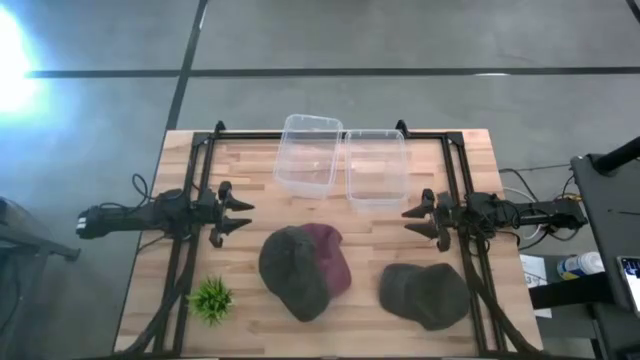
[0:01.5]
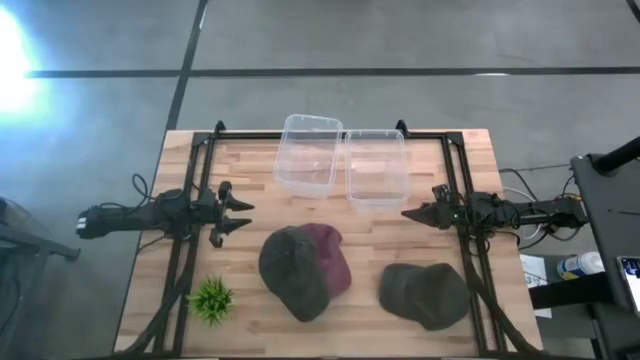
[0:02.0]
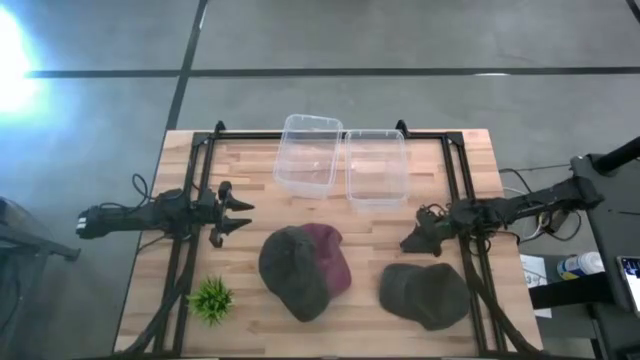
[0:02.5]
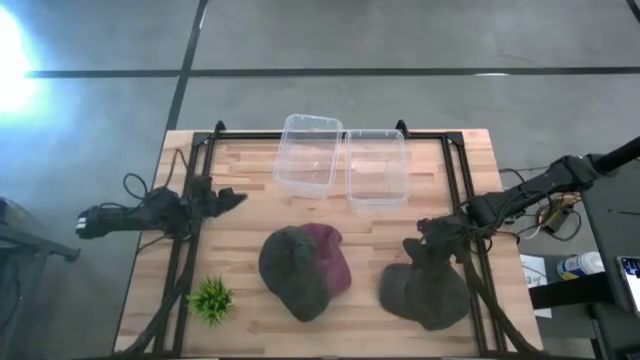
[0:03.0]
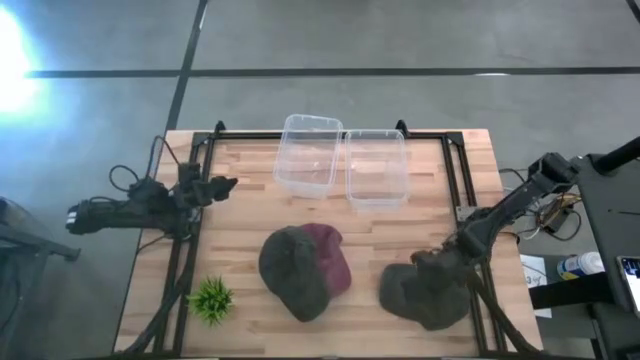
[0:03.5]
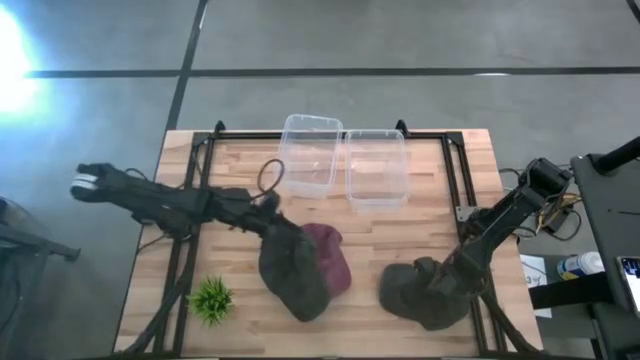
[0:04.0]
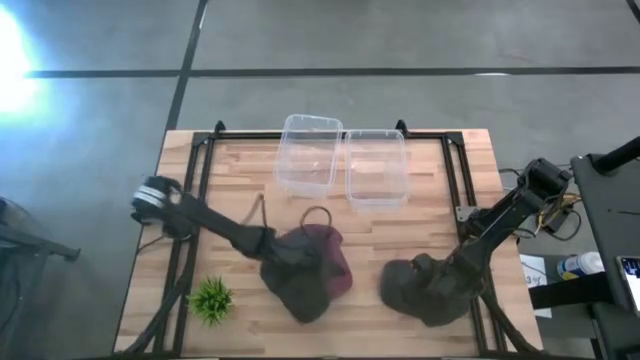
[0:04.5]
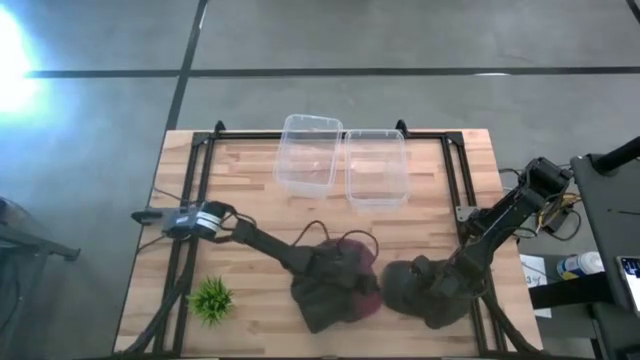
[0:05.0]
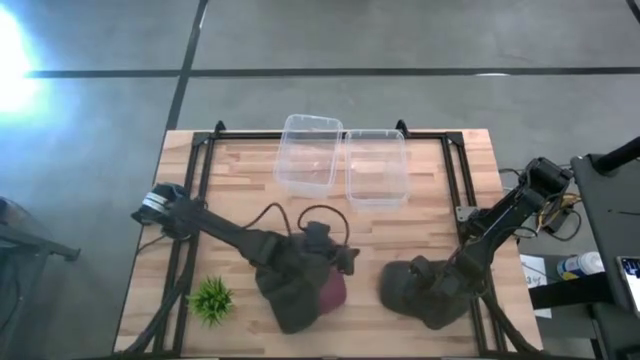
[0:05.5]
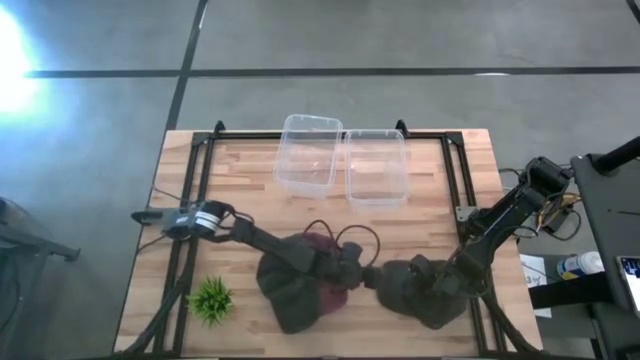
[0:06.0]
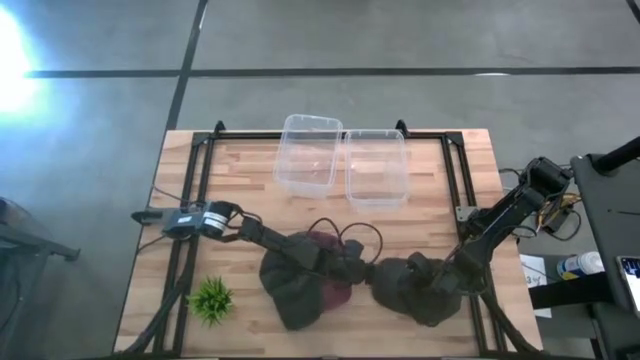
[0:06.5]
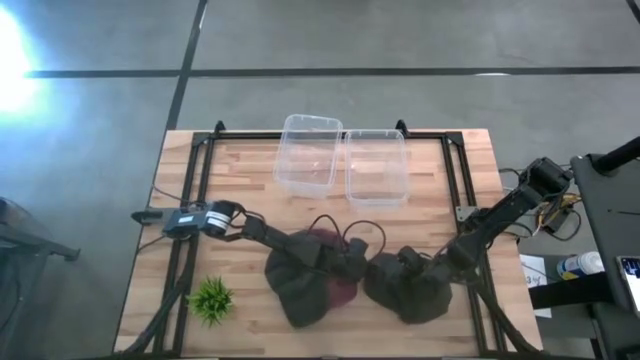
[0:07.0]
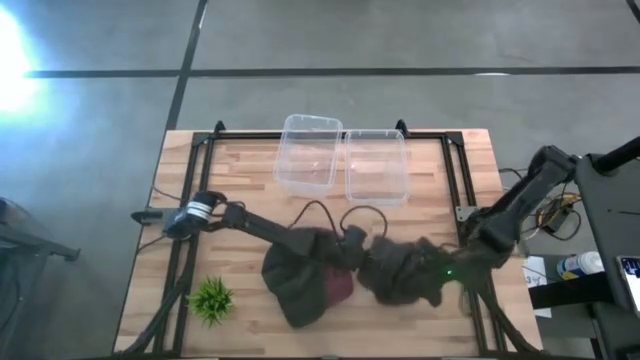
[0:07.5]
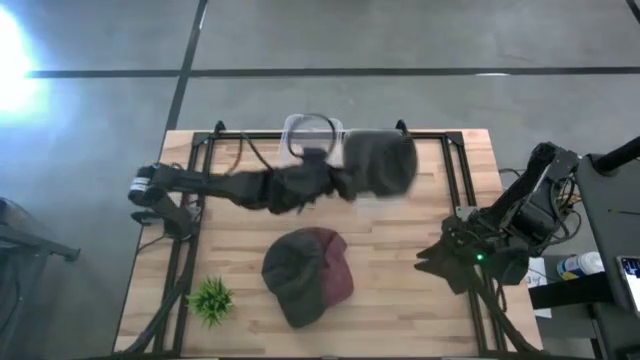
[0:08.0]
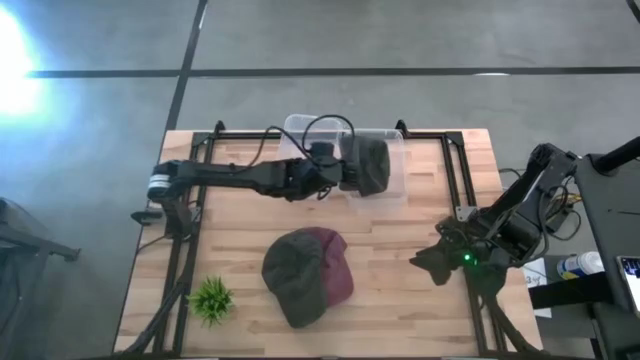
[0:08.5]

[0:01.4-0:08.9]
Task: Pick & Place hat
Put the right black cap into the right transparent bin

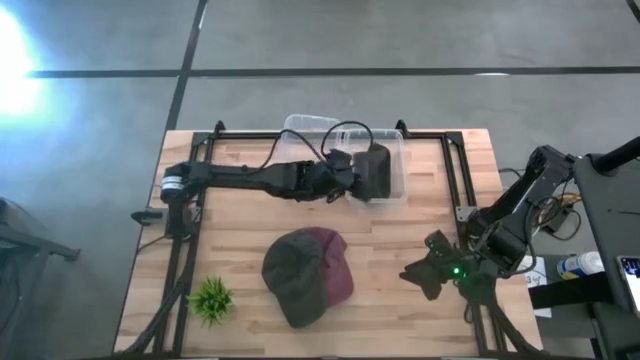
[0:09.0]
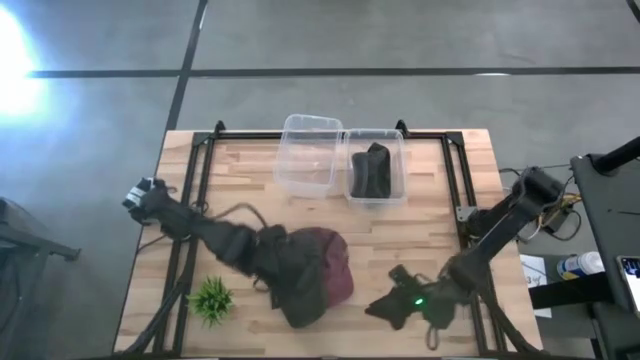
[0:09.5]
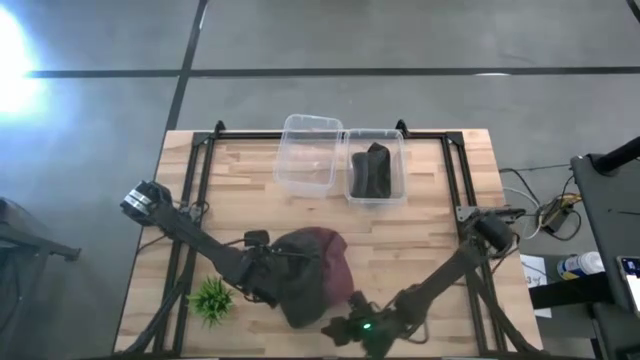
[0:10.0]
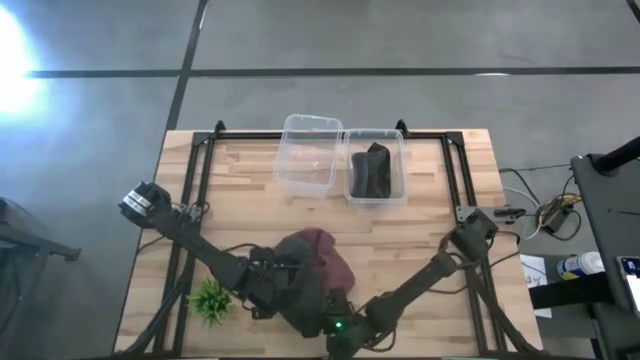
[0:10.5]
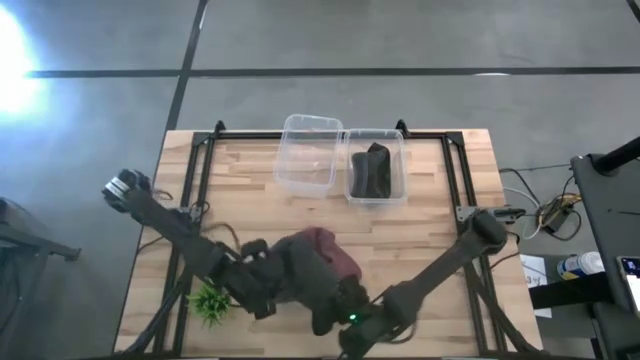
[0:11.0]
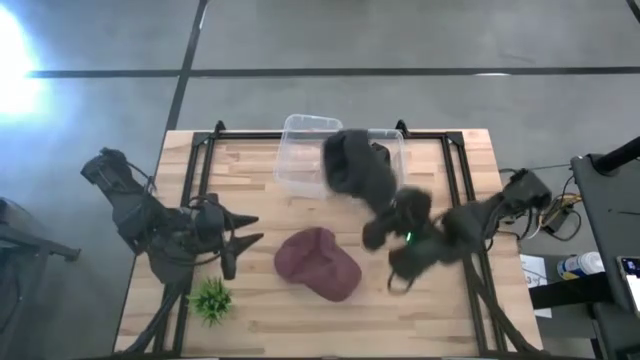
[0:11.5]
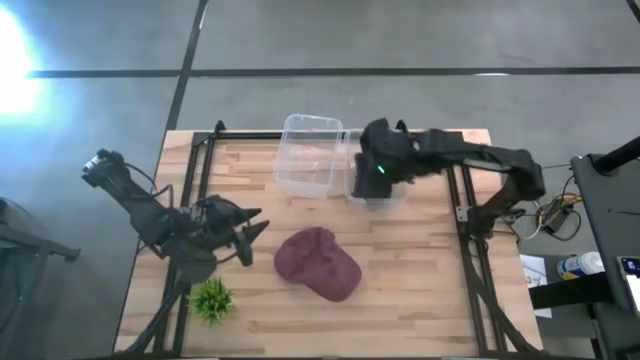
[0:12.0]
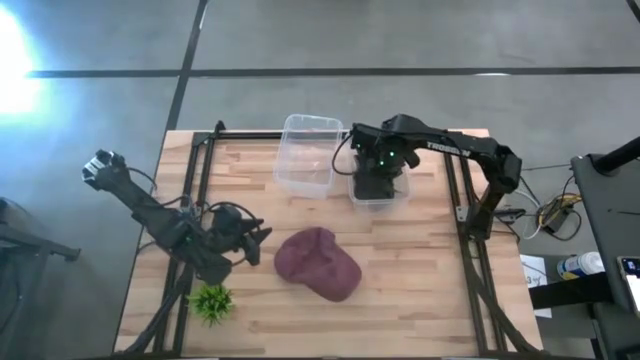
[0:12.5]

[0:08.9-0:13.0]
Put the black cap into the right transparent bin

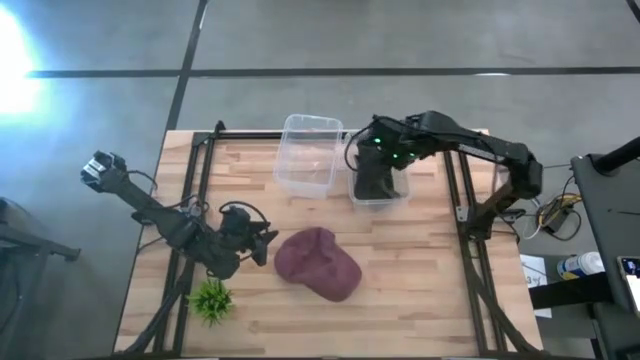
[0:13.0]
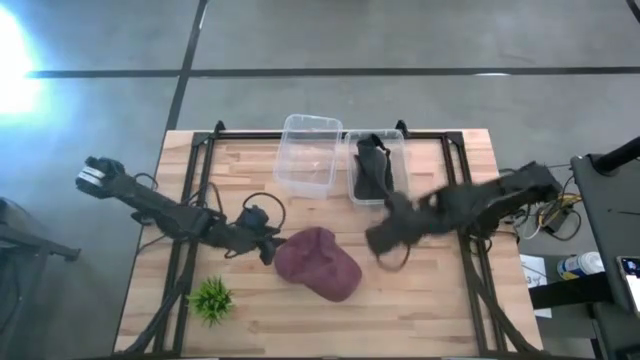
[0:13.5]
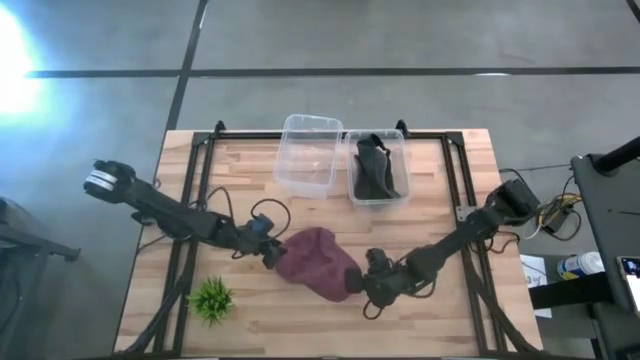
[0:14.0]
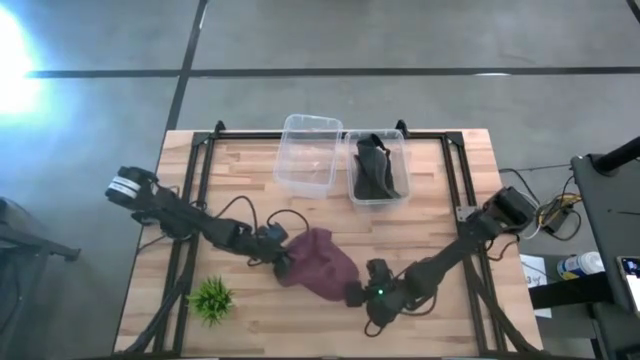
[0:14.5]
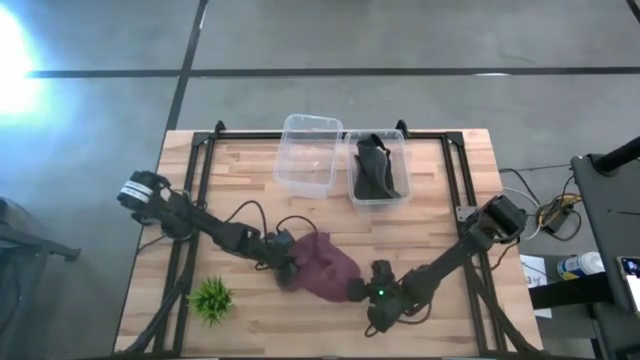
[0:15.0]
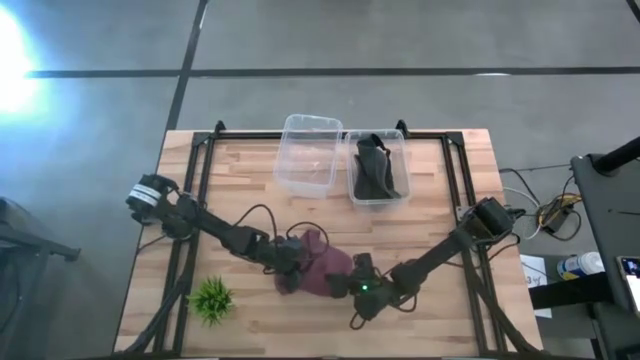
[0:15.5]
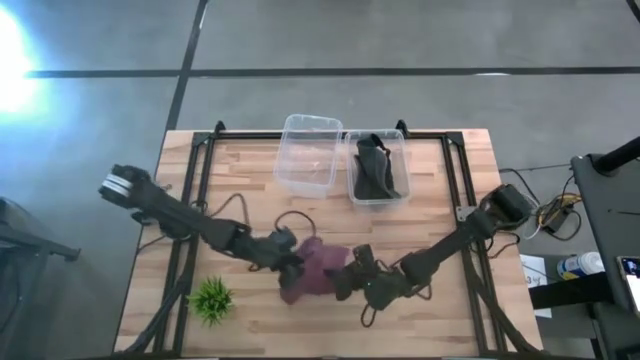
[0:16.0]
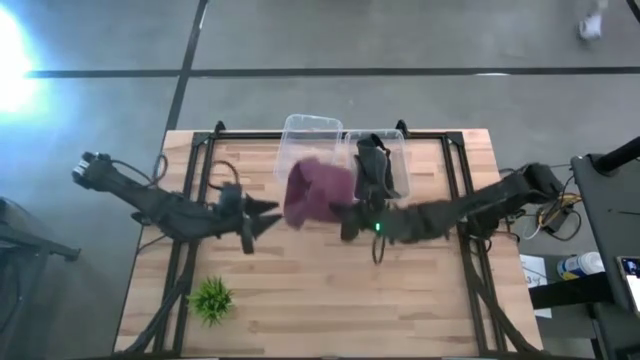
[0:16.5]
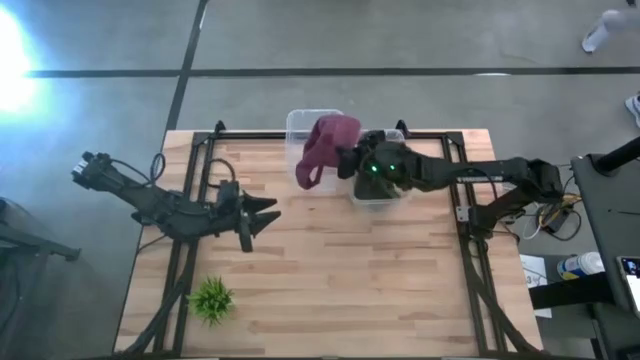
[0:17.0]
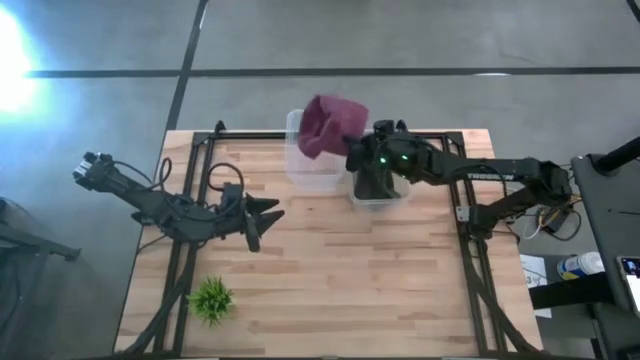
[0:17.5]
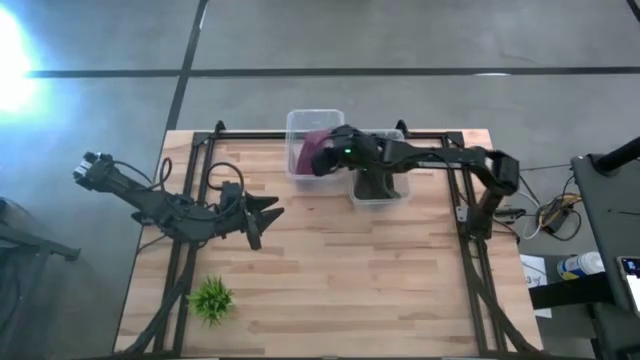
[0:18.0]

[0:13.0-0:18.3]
Put the red cap into the left transparent bin

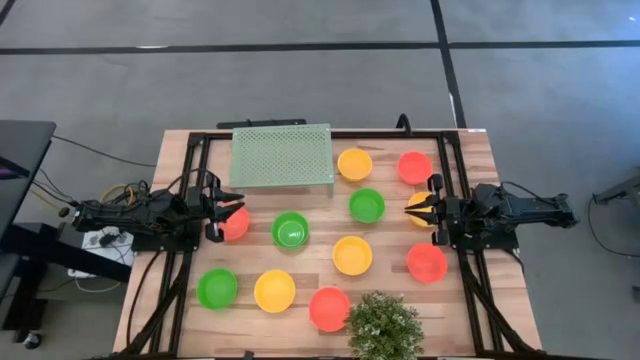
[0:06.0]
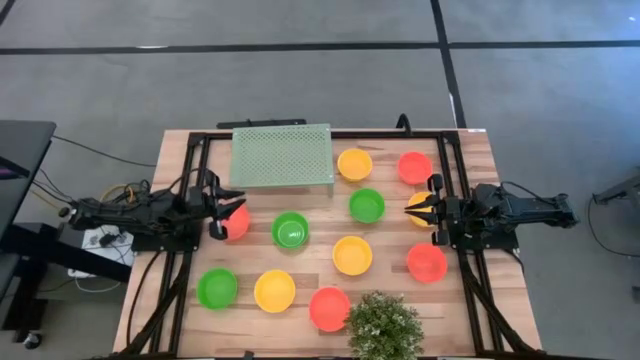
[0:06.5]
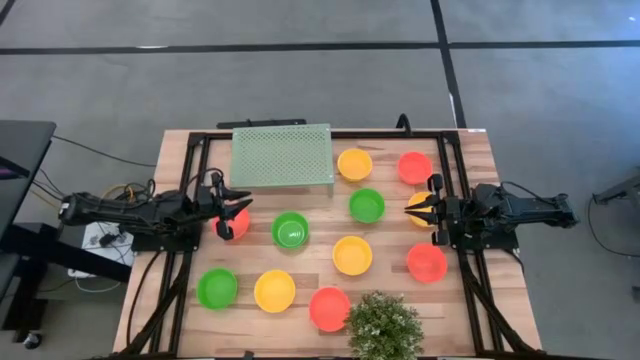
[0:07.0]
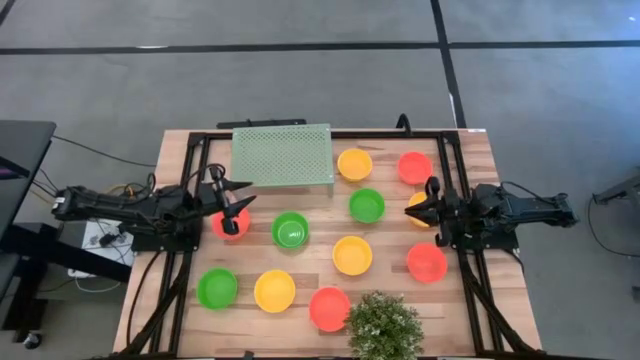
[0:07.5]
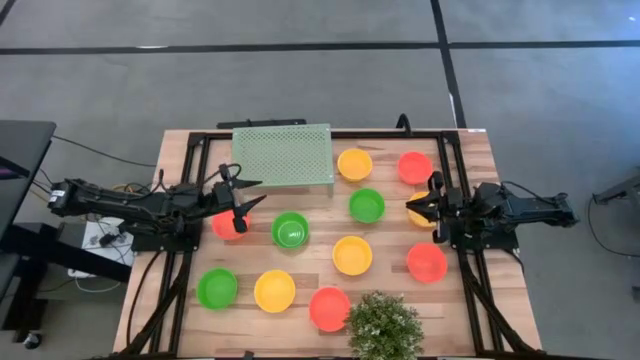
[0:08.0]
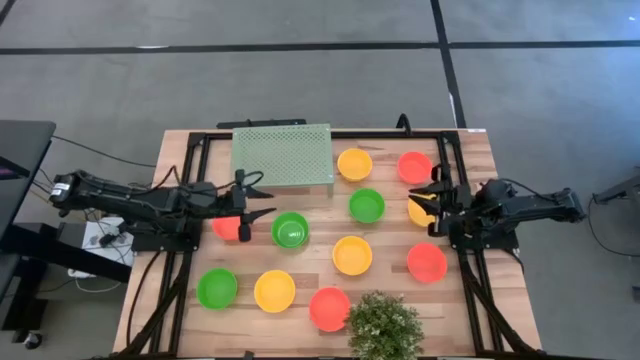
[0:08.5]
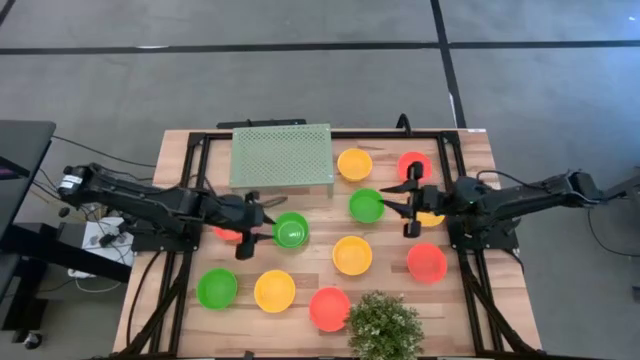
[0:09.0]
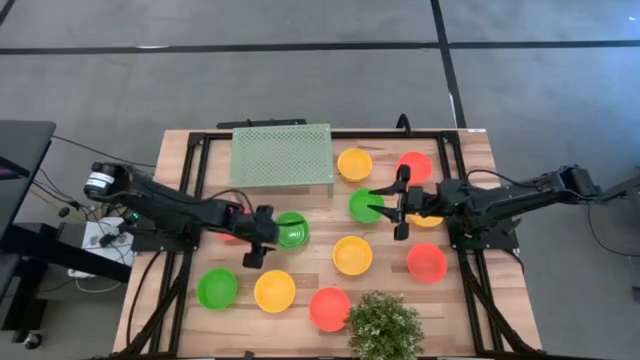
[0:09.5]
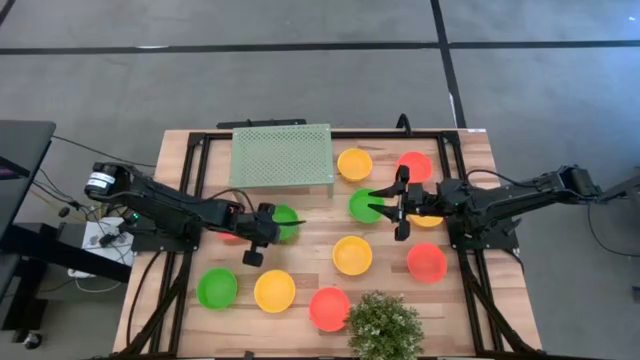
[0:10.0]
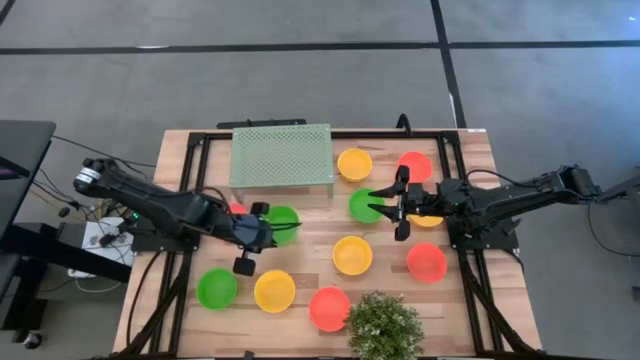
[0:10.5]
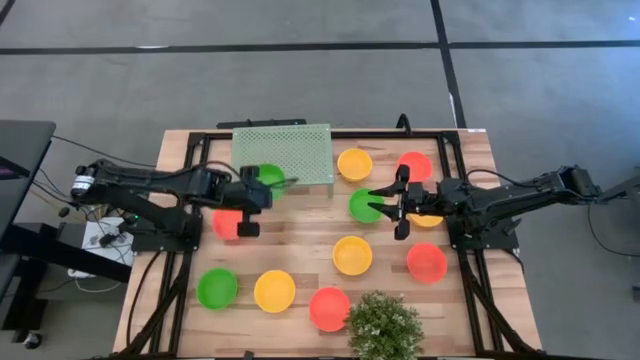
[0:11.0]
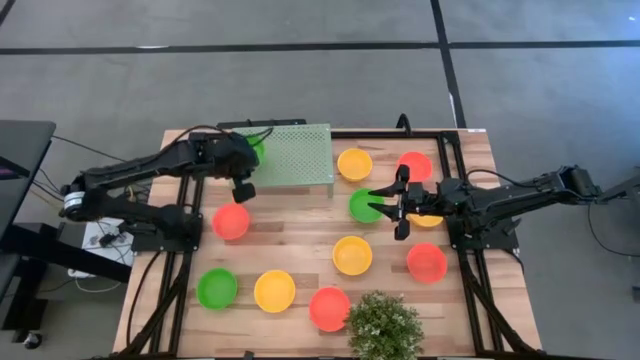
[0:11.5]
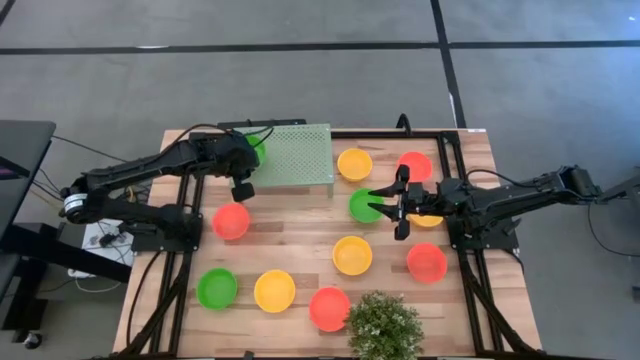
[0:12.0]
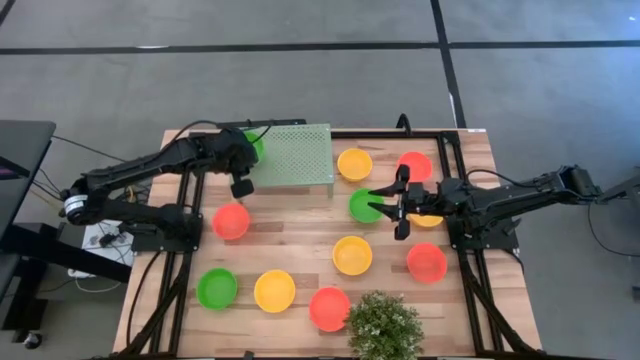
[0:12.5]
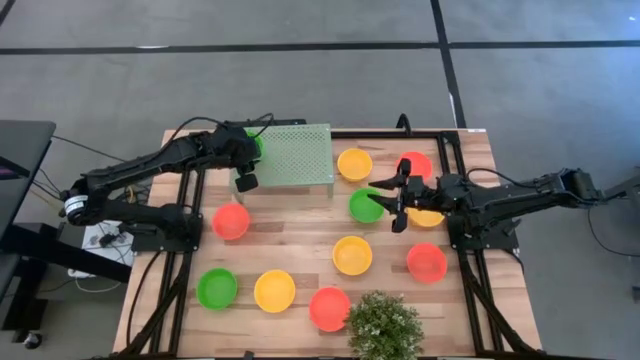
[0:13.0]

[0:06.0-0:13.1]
Task: Pick & Place Mini bowls
Put the green bowl on the shelf
